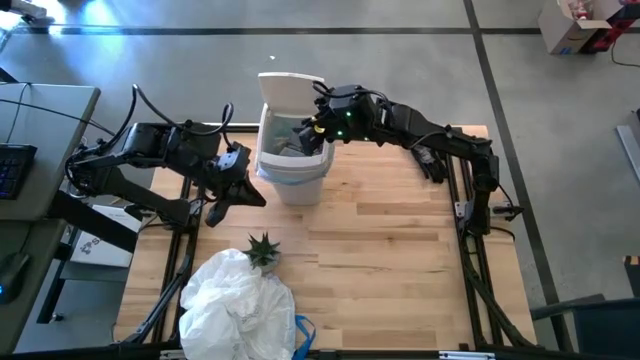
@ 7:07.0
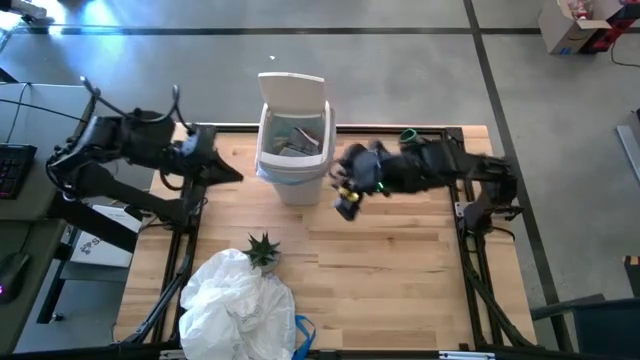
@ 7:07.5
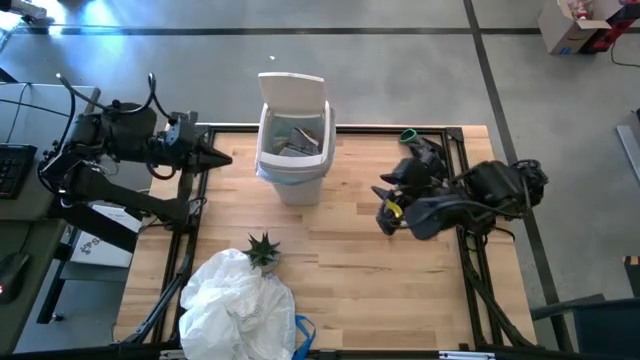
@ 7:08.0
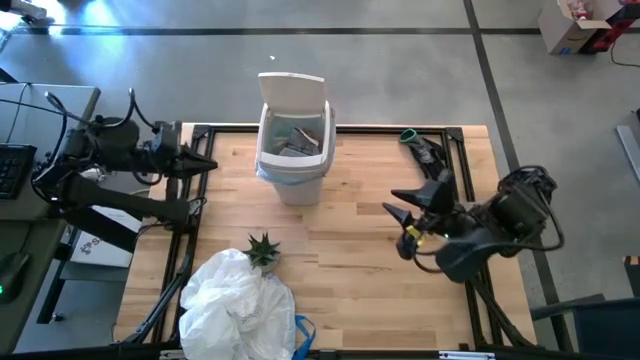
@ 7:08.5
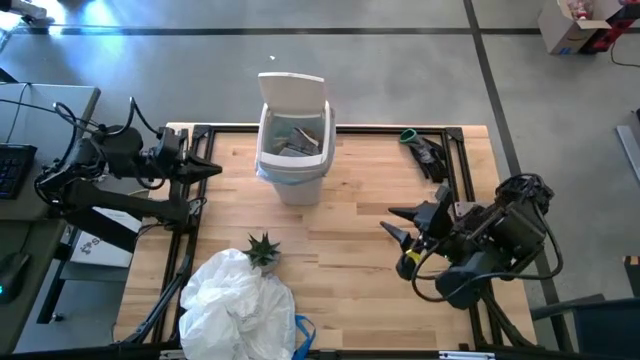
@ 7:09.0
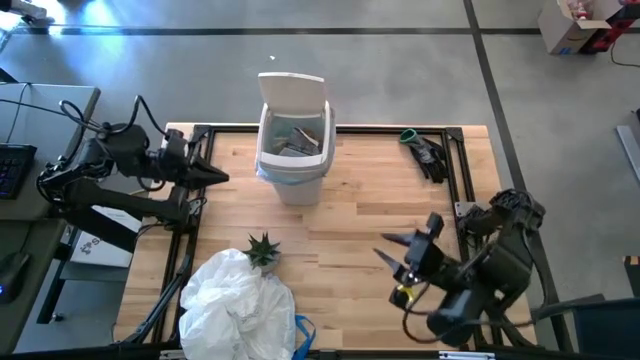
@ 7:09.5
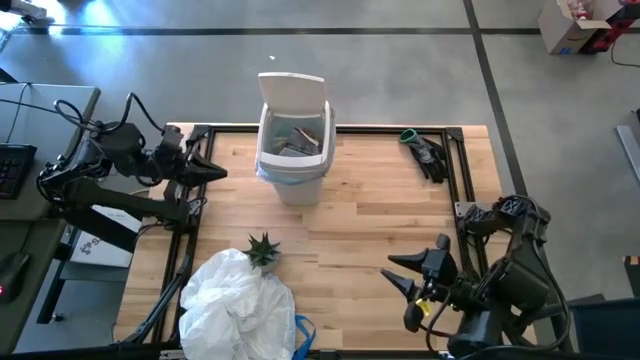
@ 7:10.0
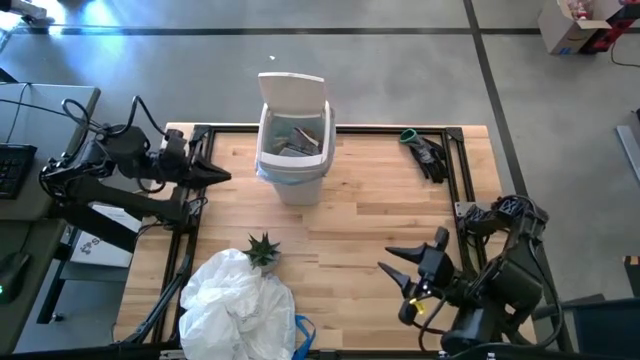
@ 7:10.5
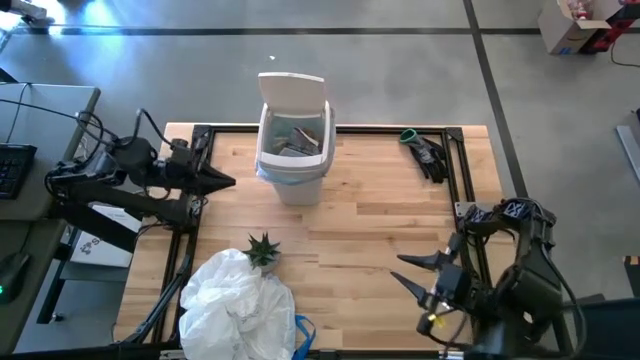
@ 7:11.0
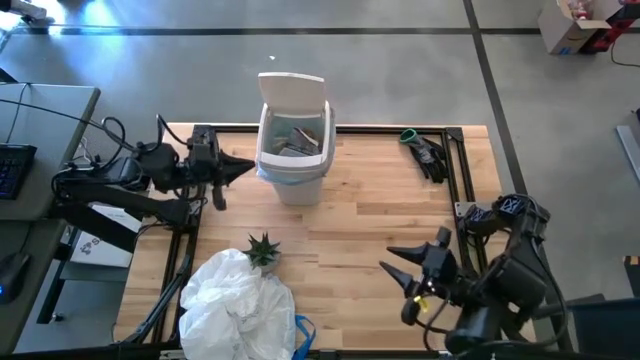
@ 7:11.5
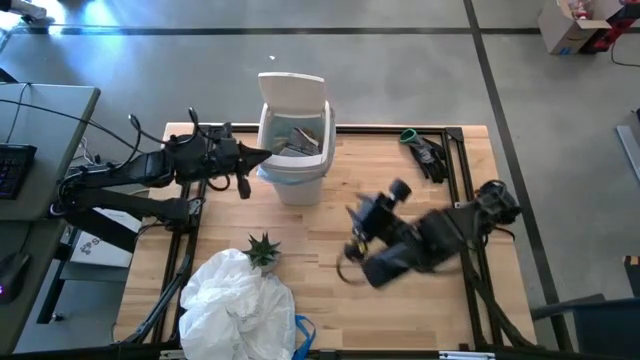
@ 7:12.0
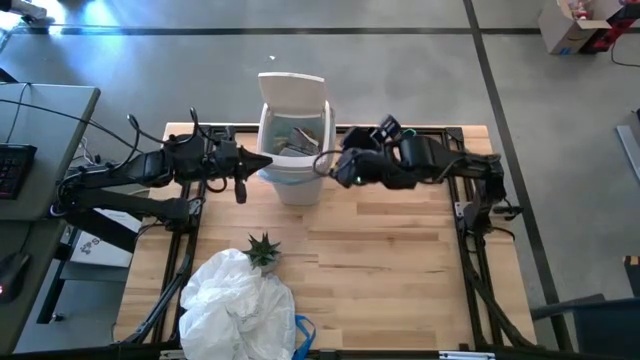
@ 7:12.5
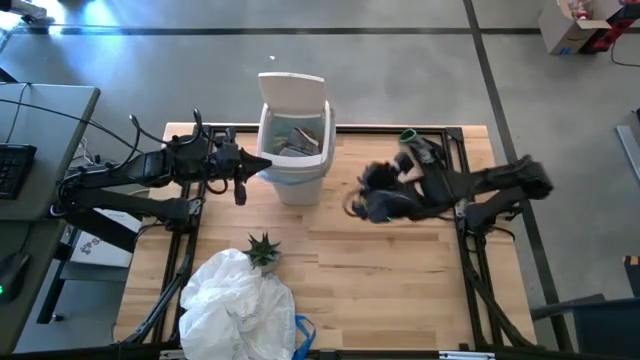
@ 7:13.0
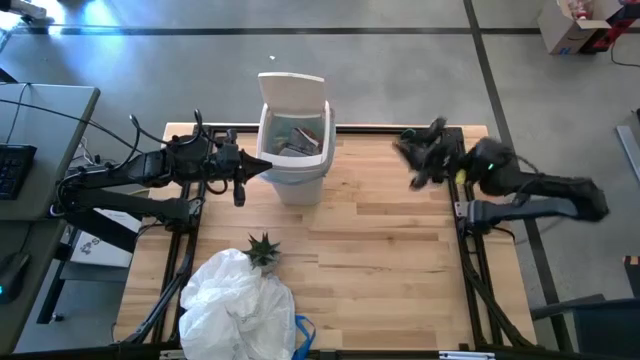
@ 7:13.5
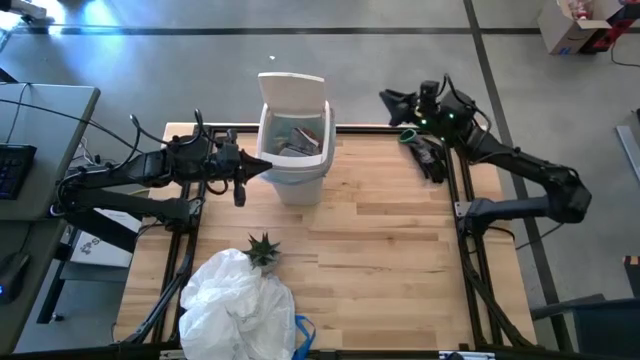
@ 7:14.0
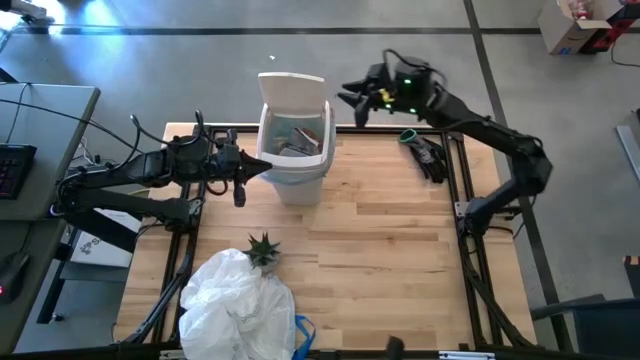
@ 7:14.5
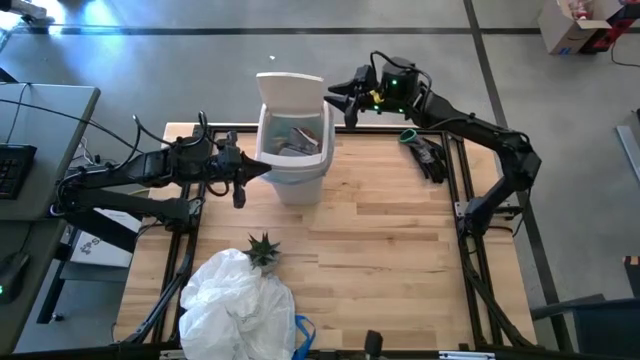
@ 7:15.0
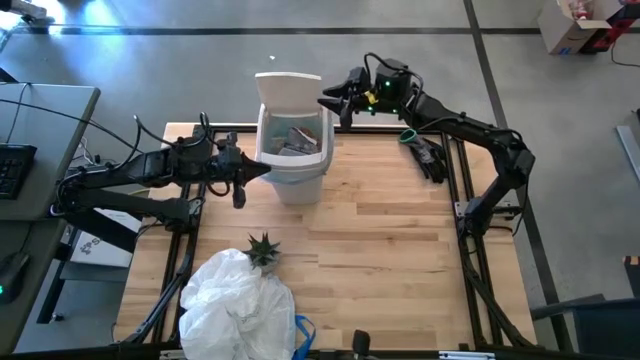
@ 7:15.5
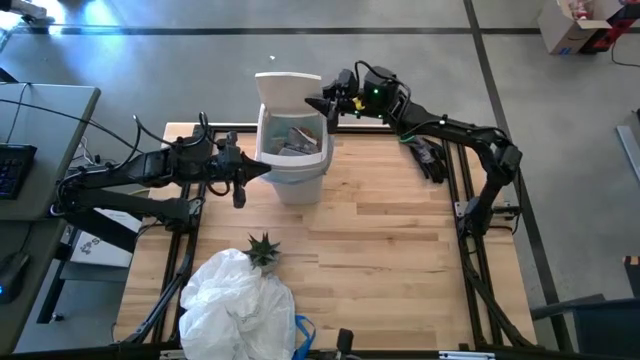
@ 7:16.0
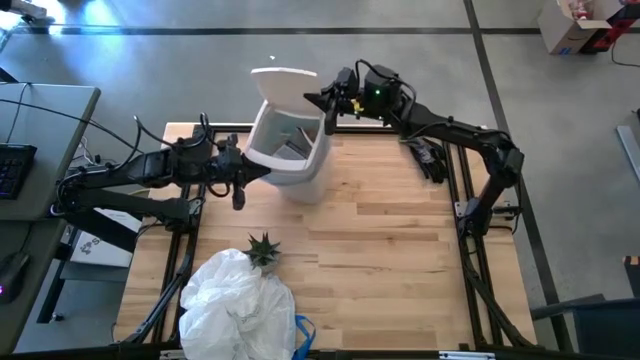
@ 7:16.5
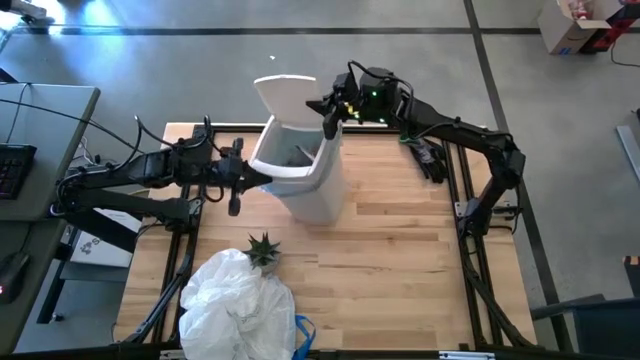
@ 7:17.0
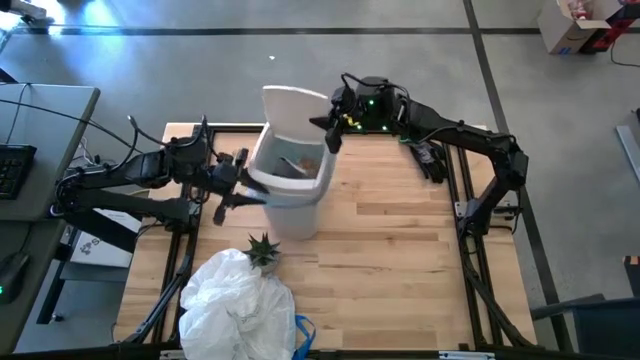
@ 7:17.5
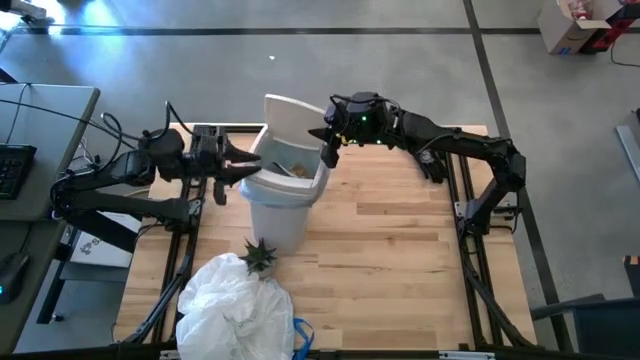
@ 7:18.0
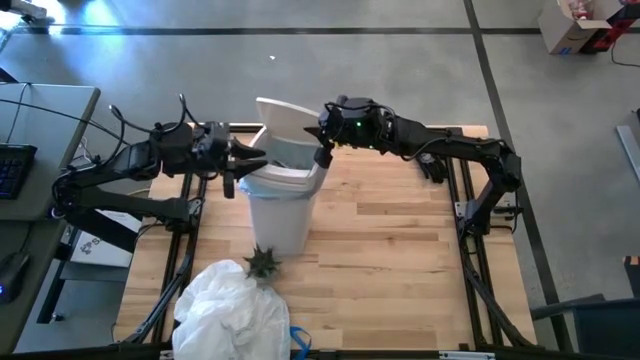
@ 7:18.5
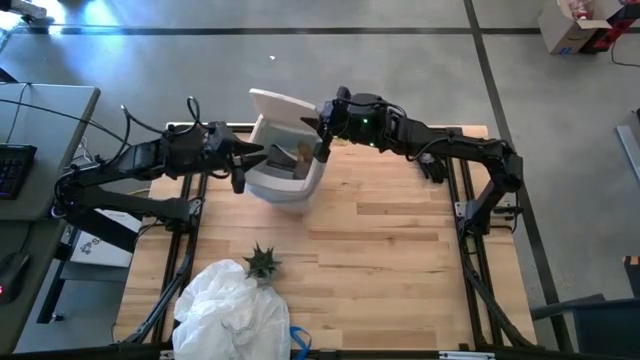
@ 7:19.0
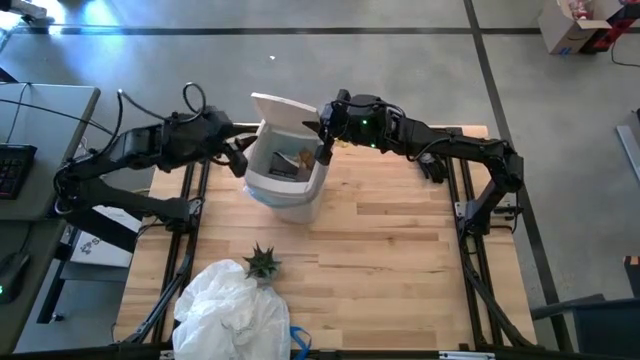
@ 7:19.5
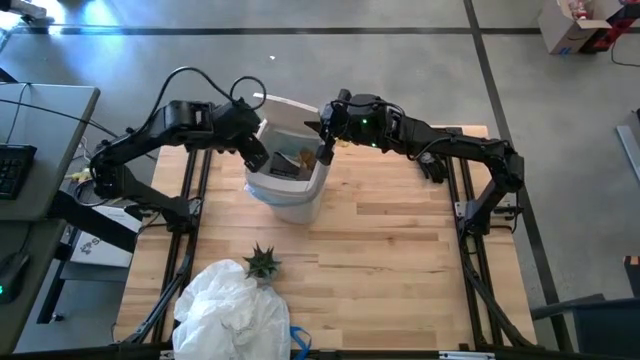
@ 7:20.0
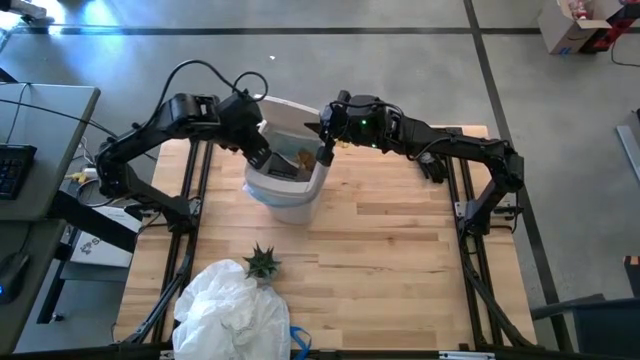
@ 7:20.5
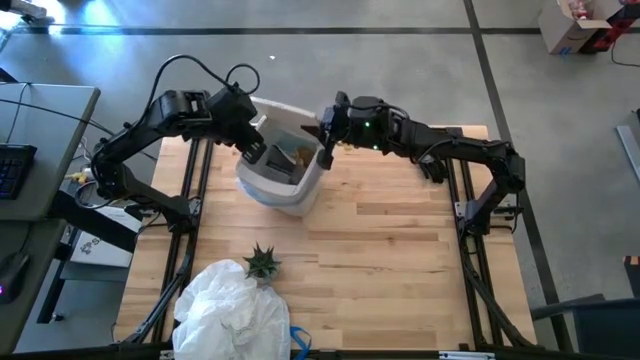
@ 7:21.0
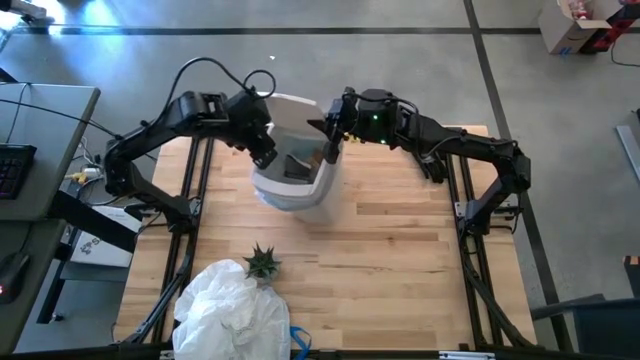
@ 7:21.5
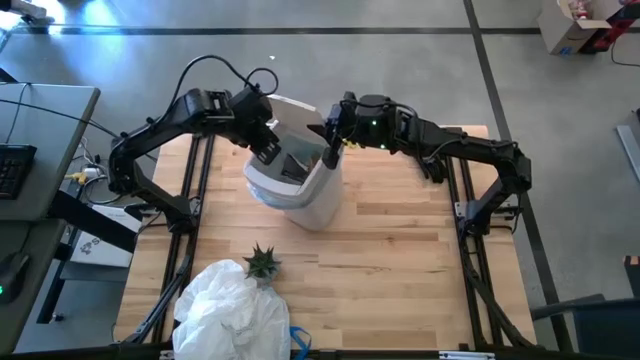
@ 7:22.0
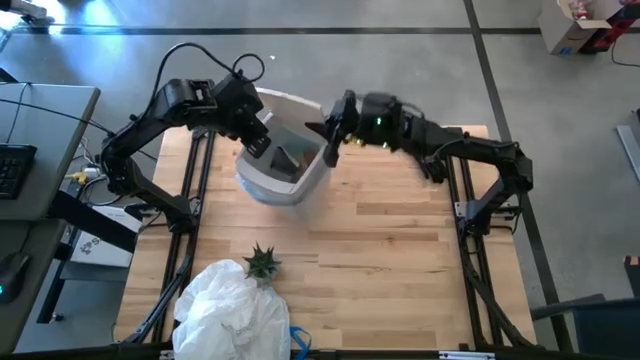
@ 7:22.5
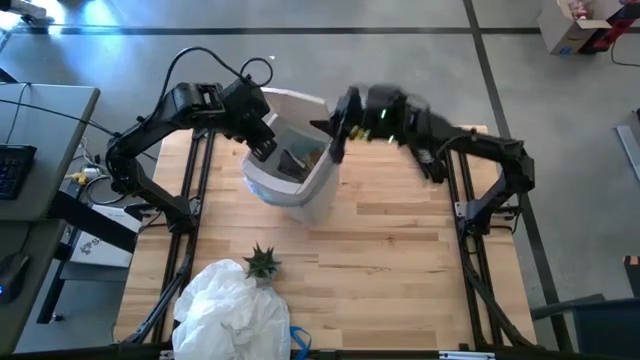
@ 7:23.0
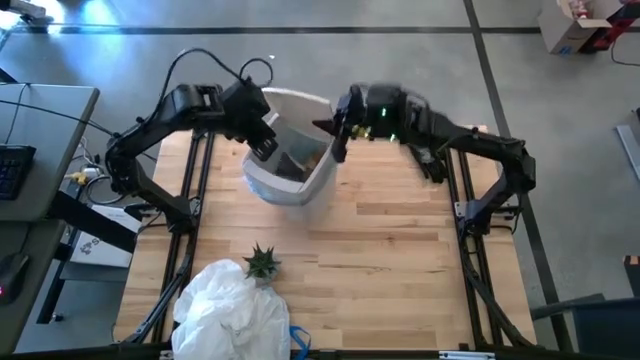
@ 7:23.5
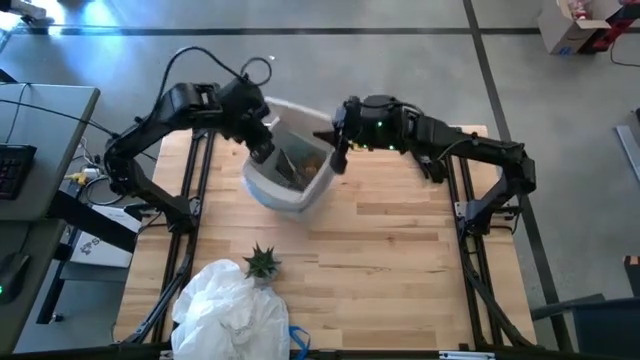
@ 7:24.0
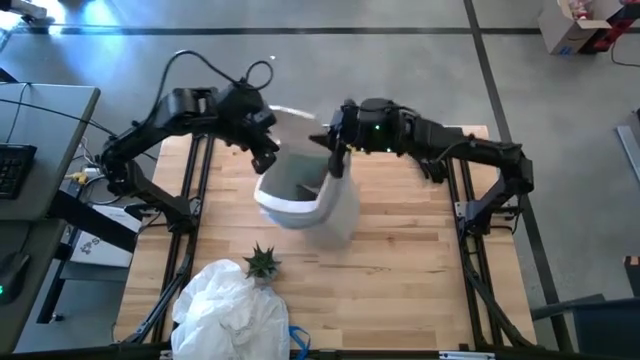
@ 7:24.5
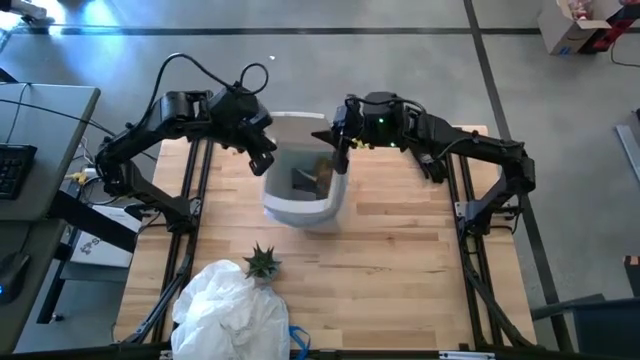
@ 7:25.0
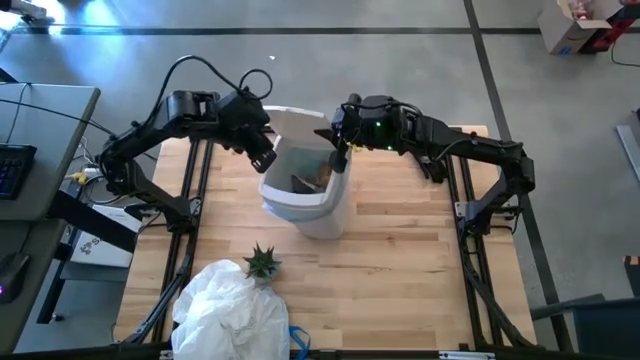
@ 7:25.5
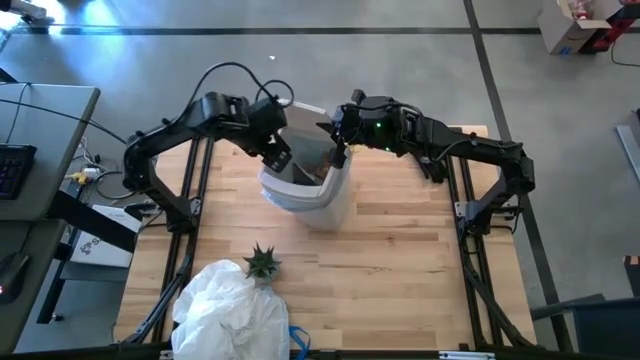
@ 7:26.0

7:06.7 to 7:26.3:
Task: place trash/remove bag and relplace
Remove the trash bag from the trash bin

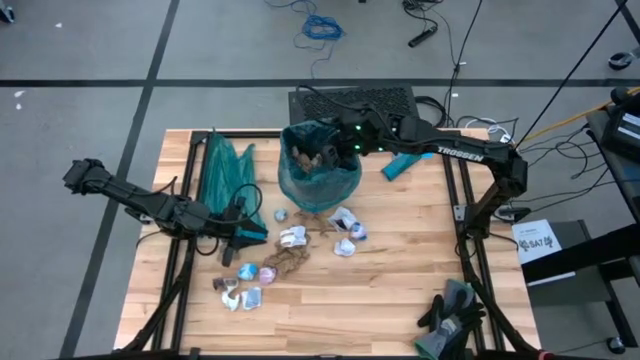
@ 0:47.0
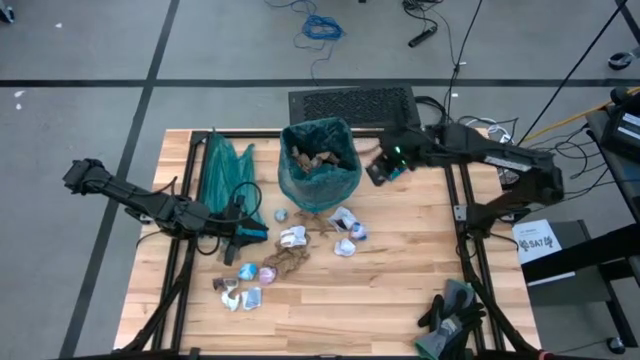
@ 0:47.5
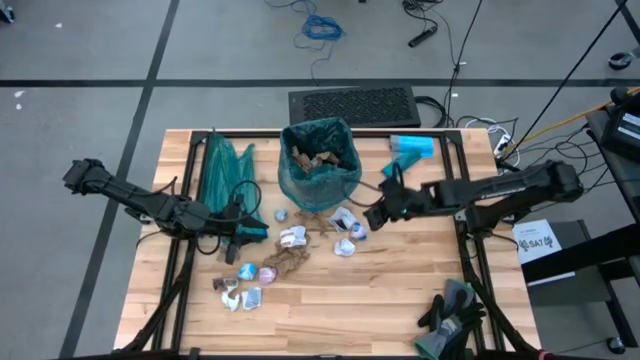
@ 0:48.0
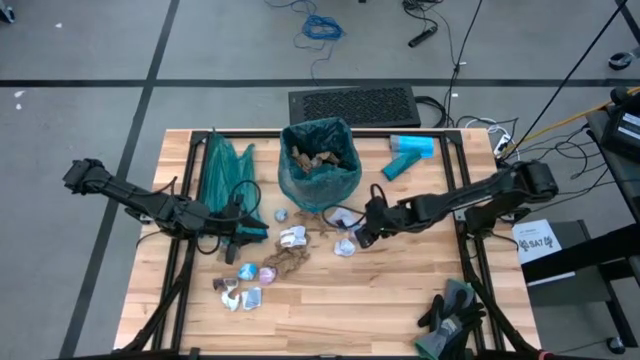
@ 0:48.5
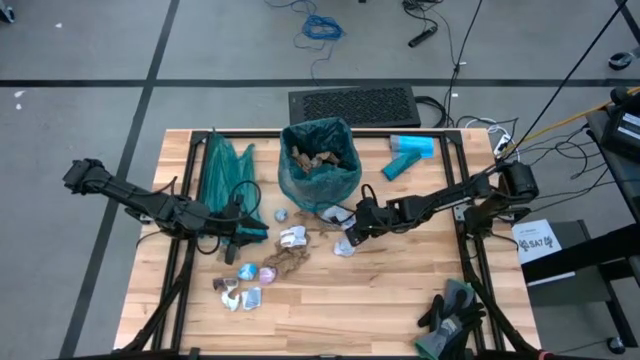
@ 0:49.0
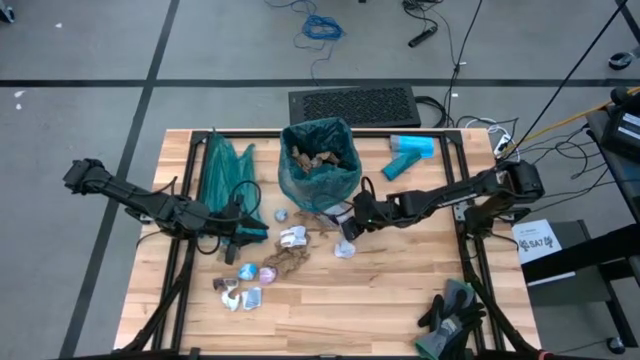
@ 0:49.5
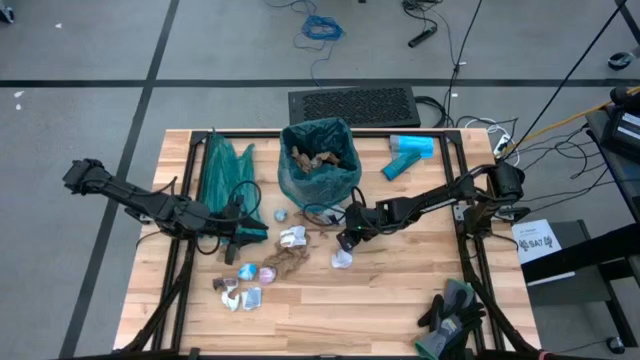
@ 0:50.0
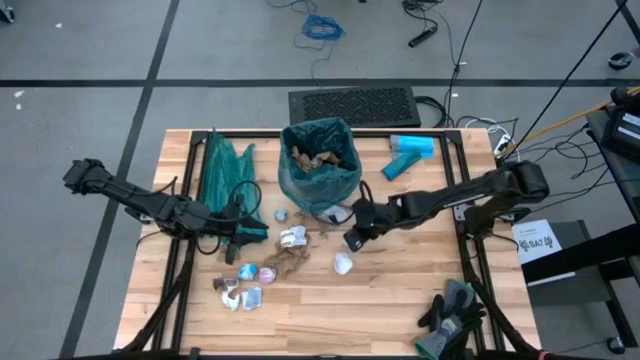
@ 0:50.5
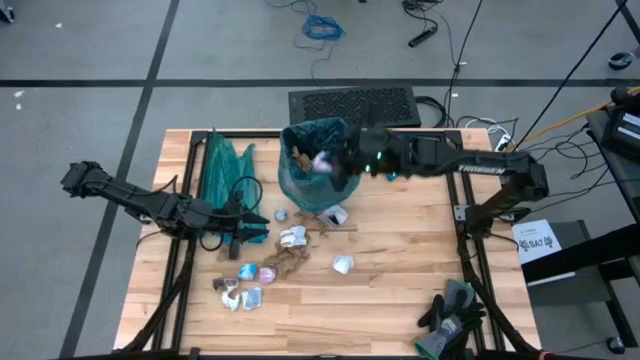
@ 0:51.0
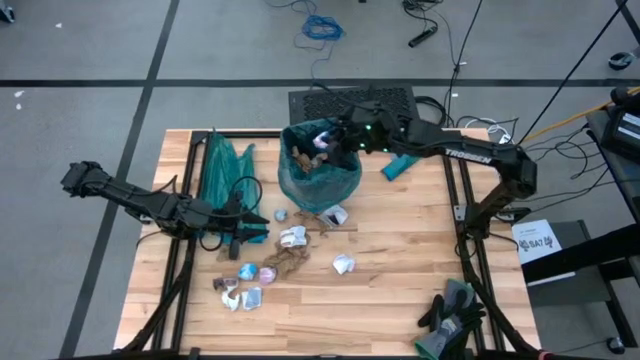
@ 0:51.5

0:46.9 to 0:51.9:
Task: place trash/remove bag and relplace
Put the blue plastic into the blue trash bag inside the black trash bin
